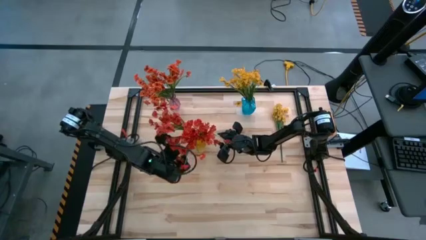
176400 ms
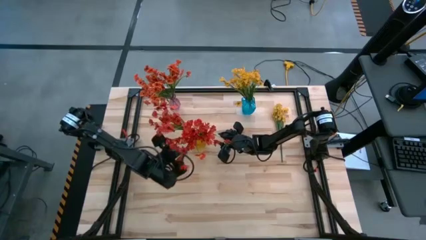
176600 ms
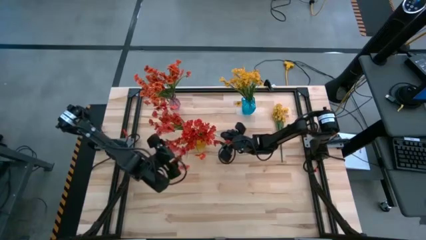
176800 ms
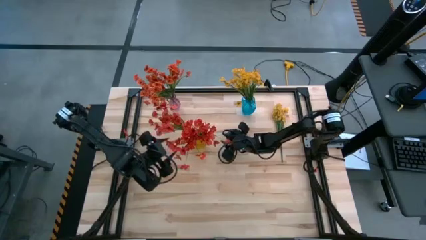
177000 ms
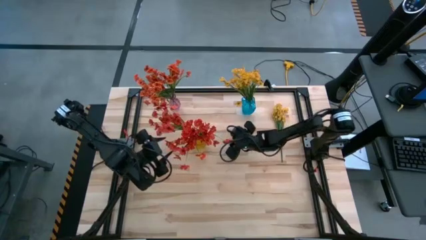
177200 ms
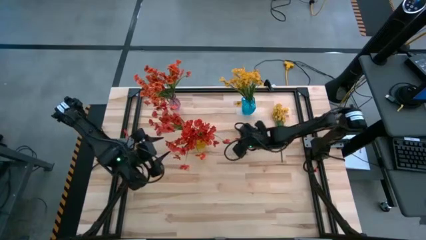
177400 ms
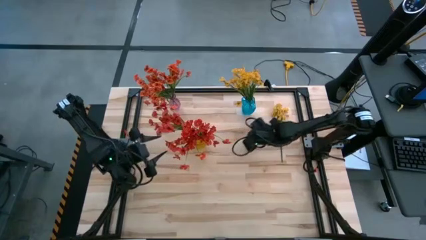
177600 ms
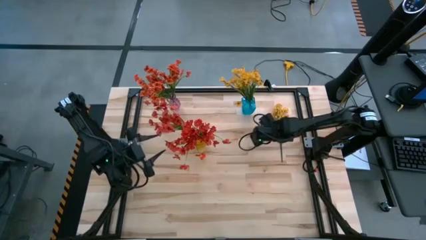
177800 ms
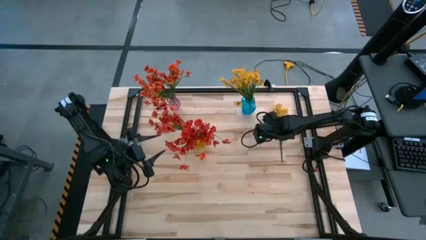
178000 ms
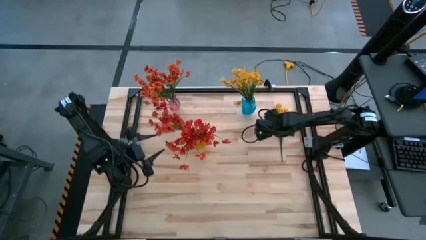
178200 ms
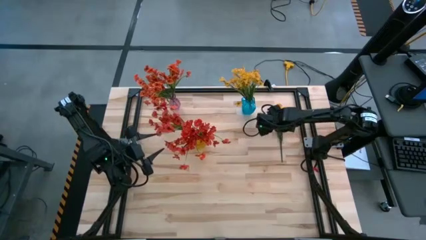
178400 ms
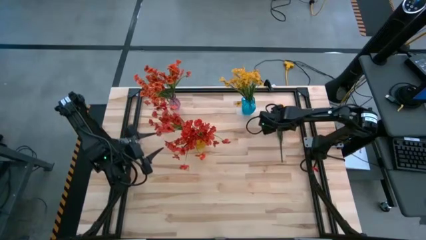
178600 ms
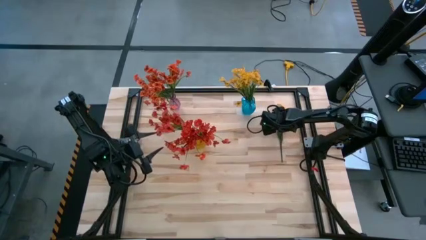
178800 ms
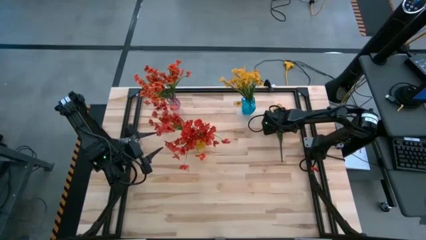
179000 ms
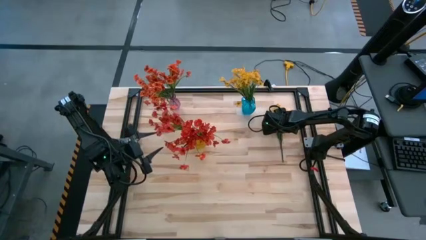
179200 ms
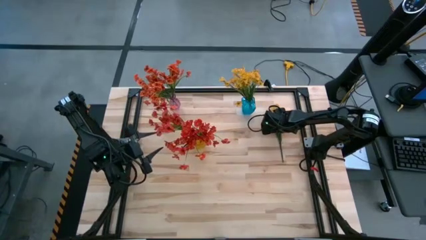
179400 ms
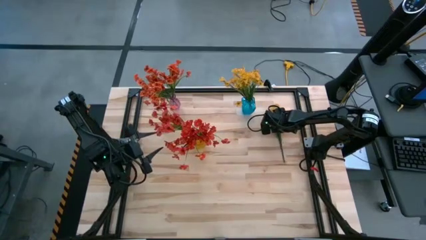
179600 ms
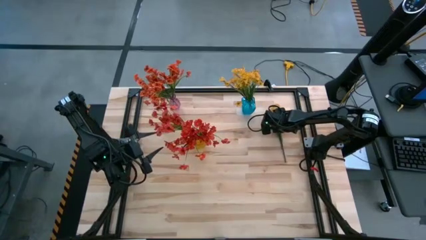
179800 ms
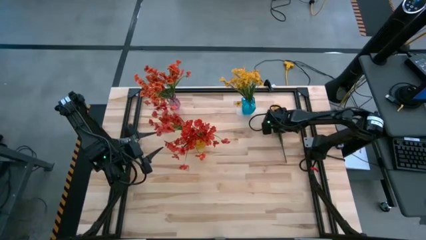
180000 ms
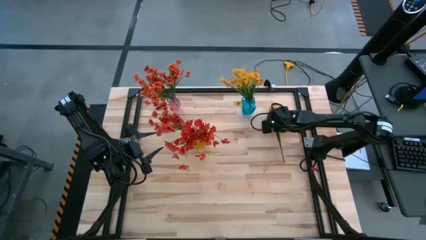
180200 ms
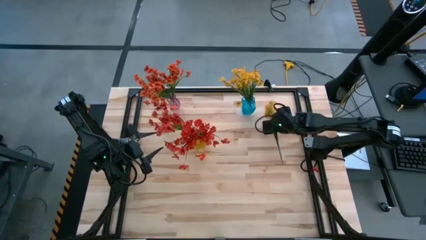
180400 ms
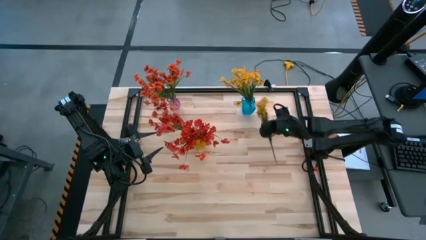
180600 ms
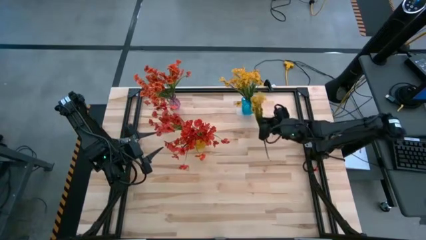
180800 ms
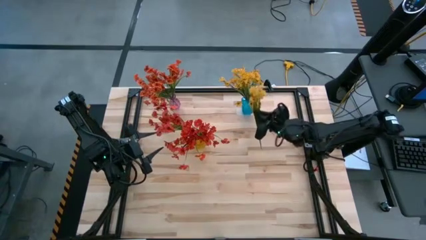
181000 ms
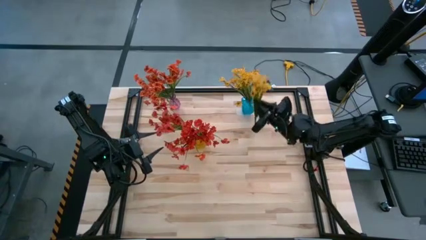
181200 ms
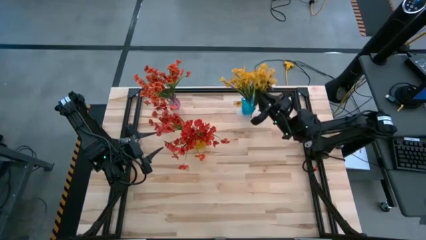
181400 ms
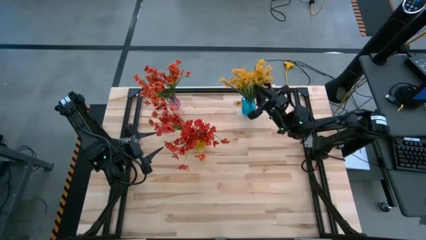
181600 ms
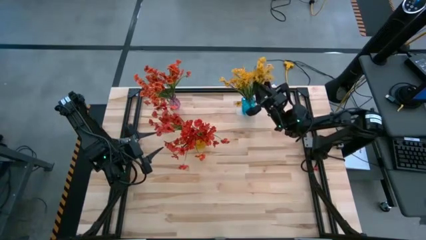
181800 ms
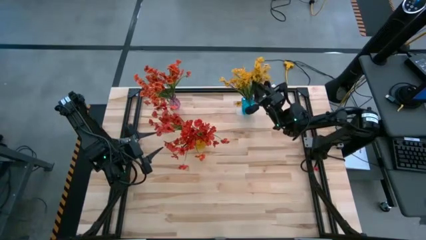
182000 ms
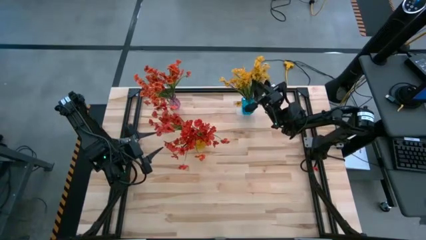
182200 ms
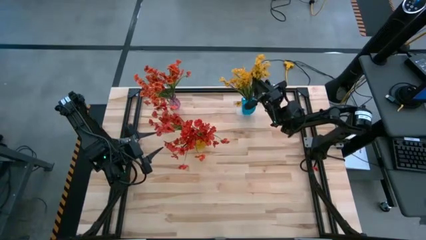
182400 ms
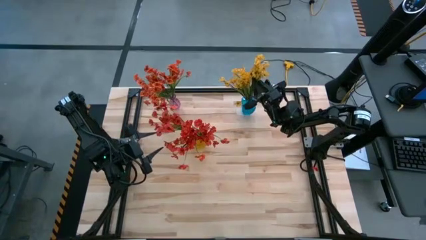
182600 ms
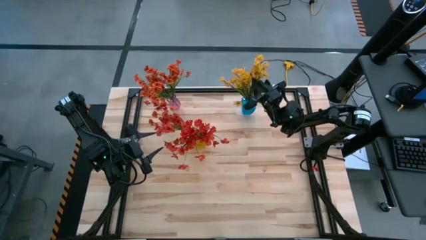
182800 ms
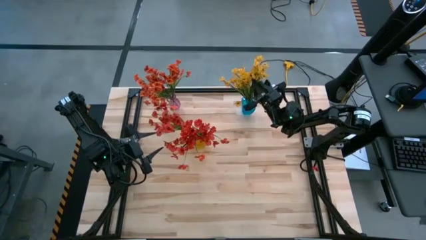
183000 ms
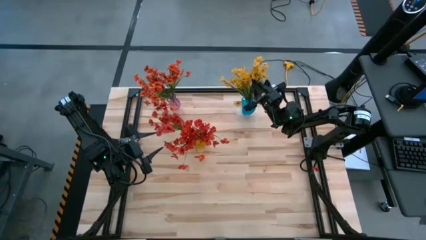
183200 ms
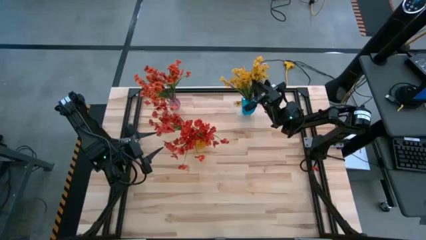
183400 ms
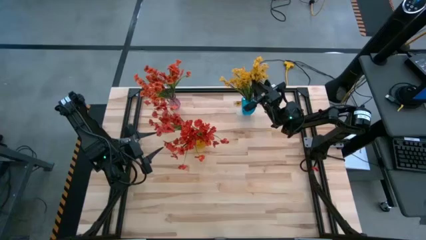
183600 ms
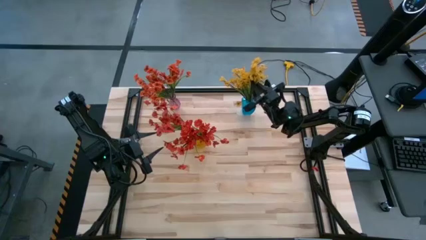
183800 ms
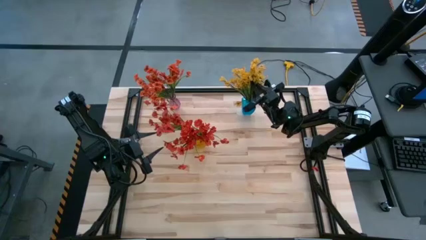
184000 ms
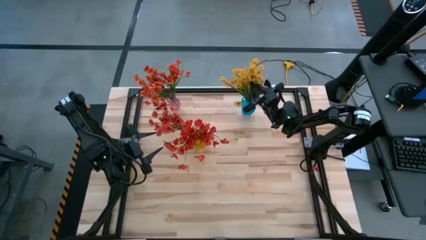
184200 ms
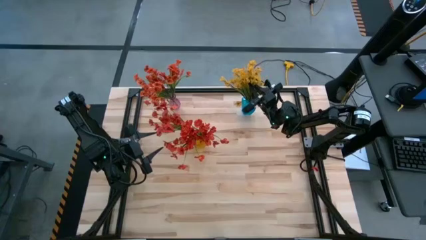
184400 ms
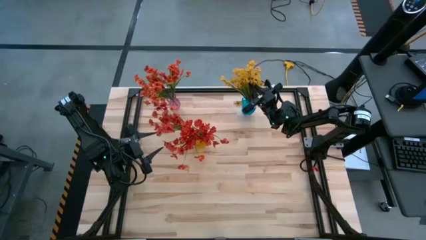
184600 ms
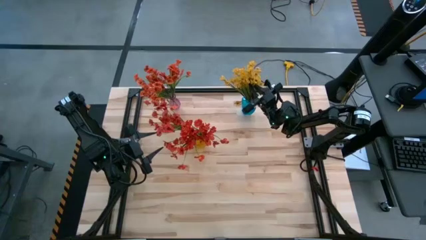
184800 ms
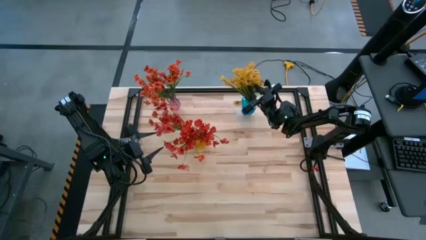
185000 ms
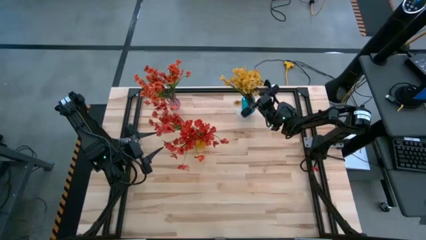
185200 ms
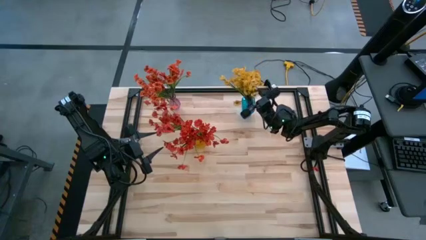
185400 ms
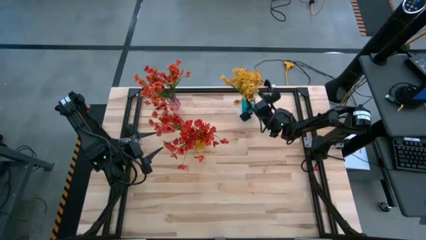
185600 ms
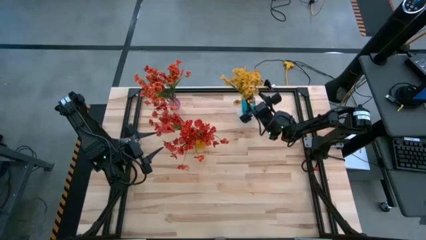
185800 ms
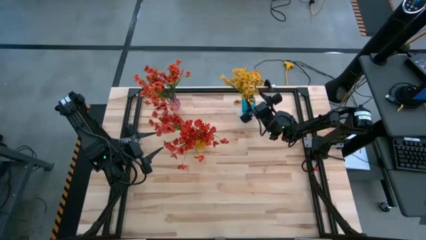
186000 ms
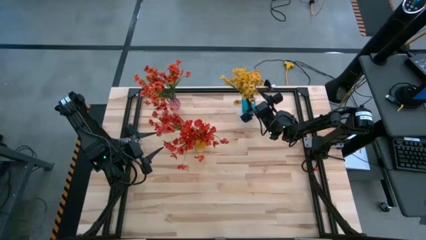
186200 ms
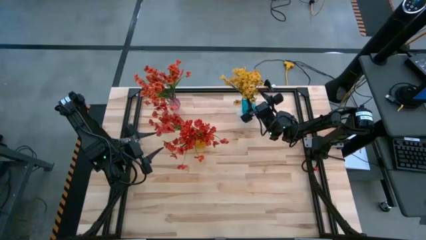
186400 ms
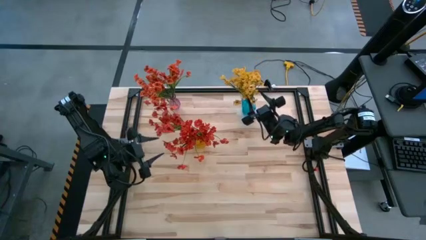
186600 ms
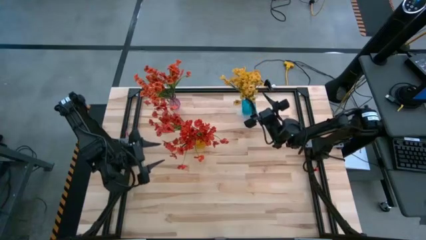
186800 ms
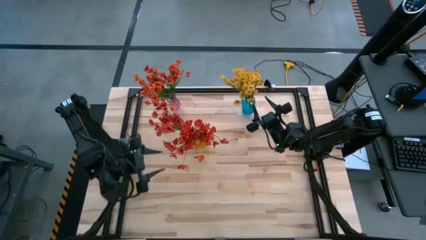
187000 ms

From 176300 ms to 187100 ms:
Task: Sort flowers into vase by color
Put the yellow flower into the blue vase

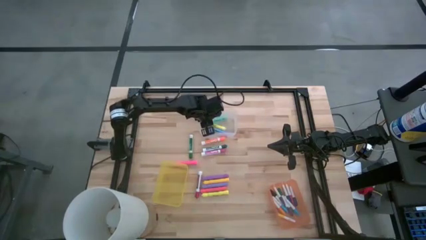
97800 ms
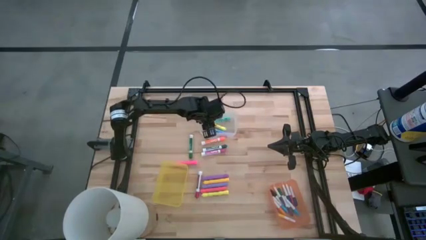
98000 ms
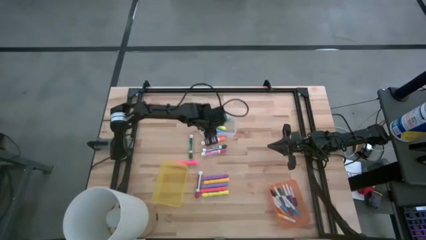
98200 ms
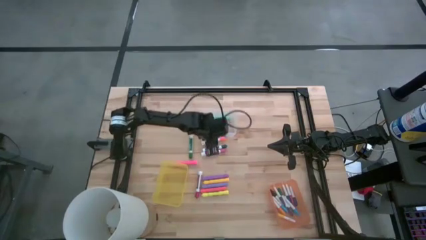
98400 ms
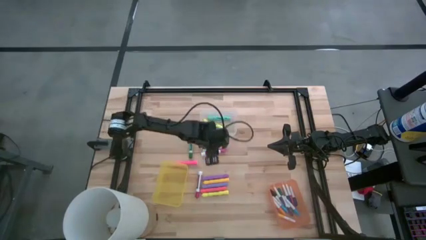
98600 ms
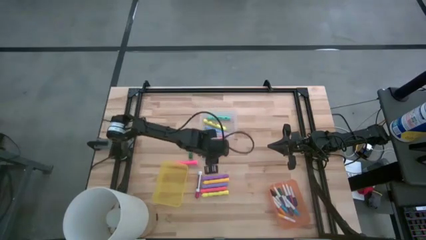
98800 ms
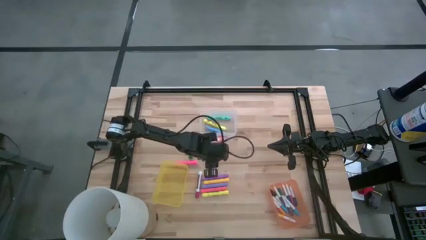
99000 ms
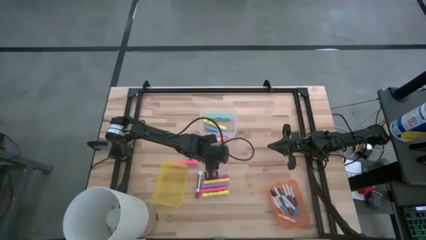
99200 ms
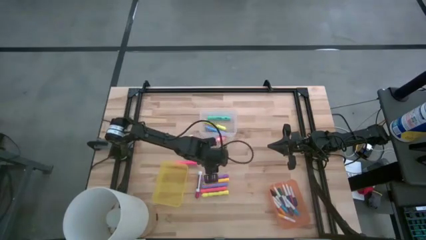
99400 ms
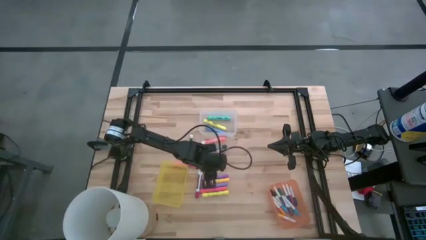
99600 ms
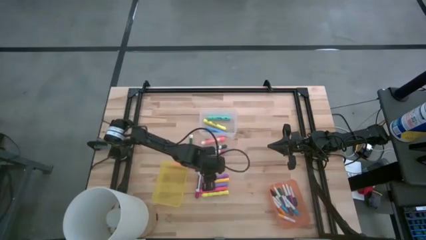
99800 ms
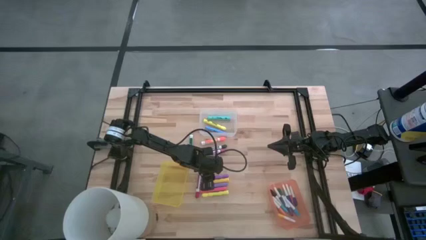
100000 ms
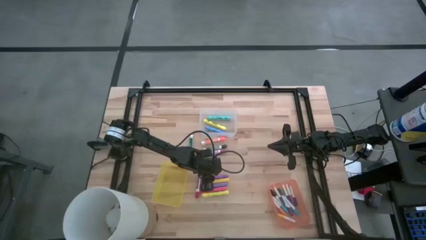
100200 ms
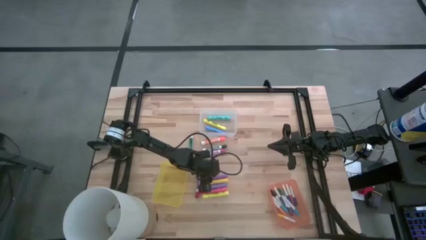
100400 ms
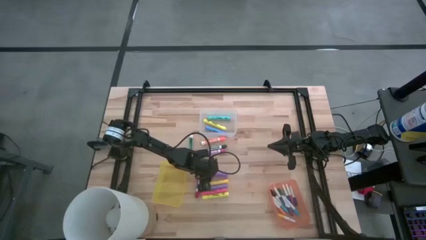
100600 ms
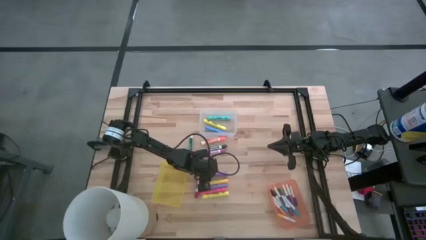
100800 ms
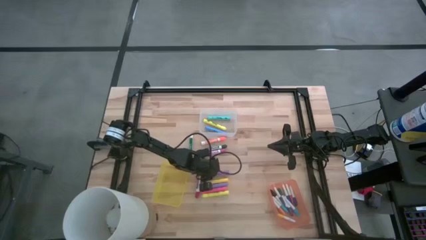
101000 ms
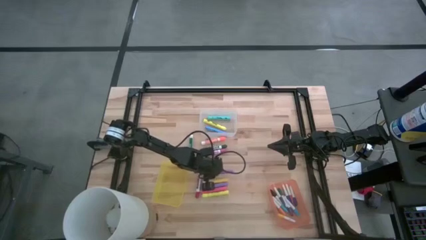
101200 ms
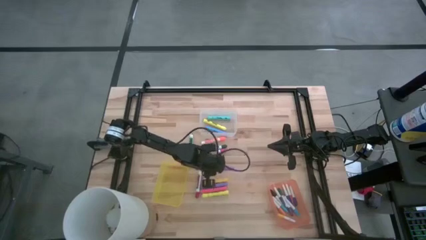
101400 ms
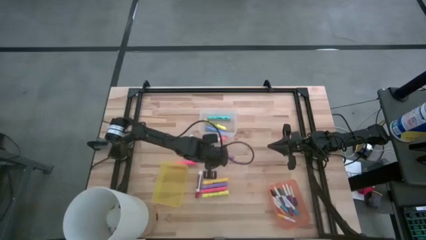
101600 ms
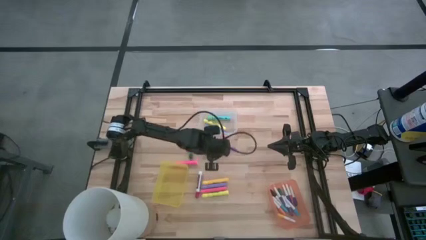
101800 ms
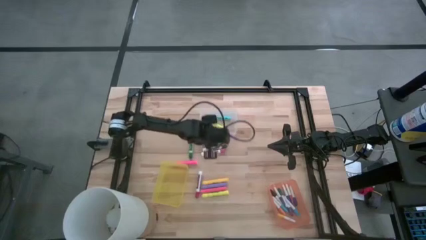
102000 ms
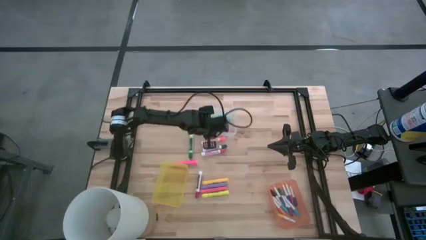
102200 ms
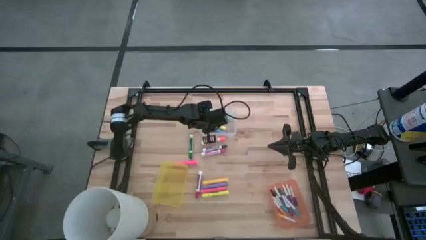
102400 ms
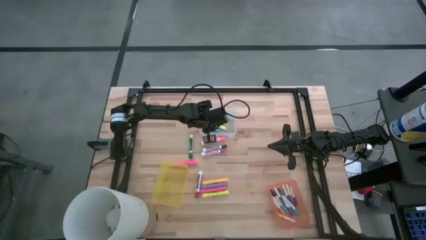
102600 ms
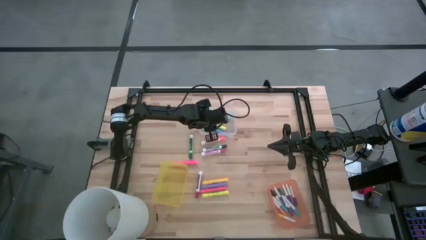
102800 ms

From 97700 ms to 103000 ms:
Task: Pick & Place Markers
Put the top large purple highlighter pen into the transparent bin
